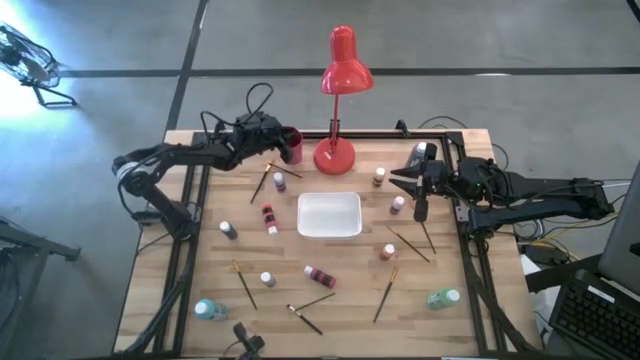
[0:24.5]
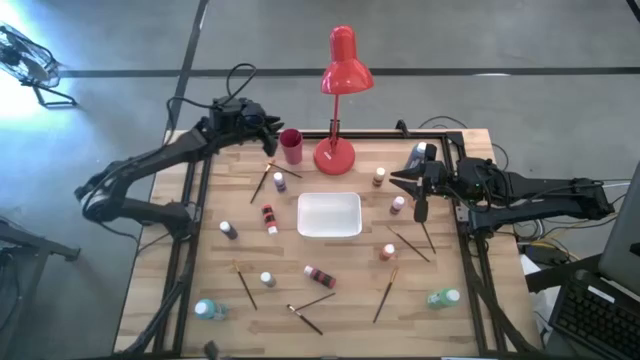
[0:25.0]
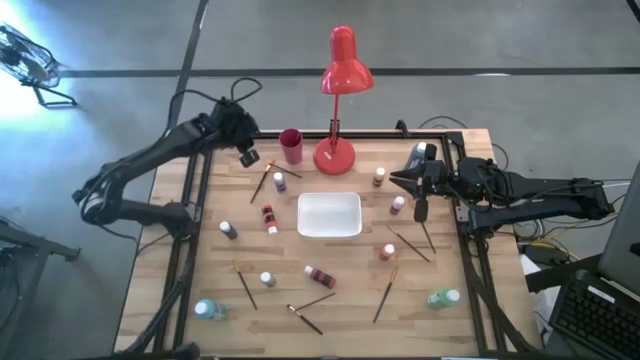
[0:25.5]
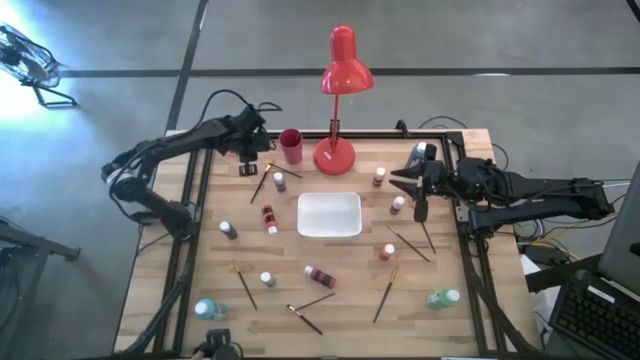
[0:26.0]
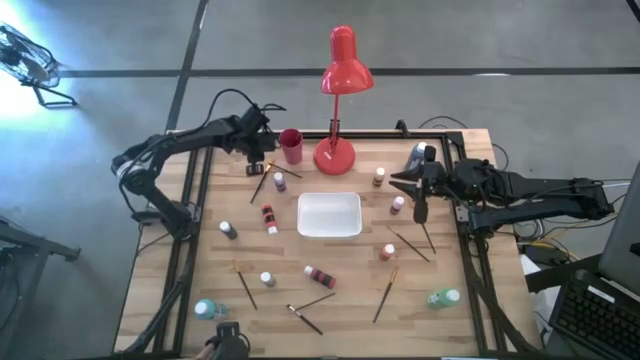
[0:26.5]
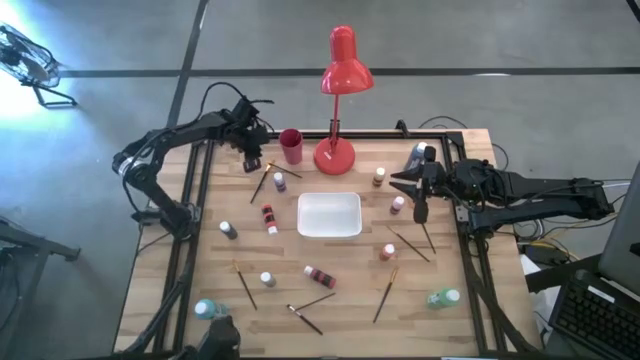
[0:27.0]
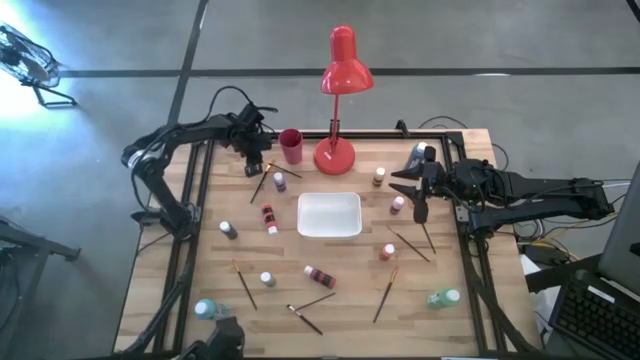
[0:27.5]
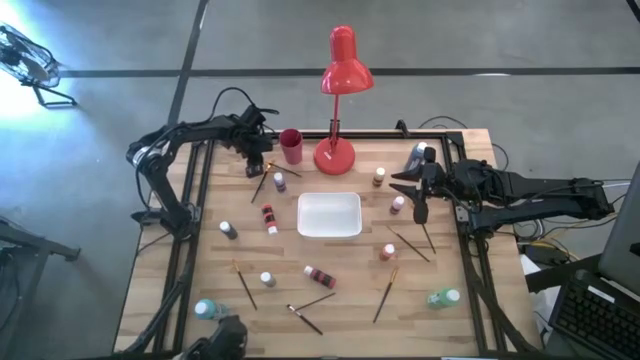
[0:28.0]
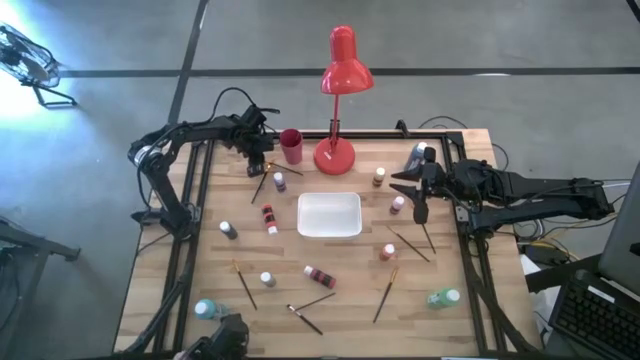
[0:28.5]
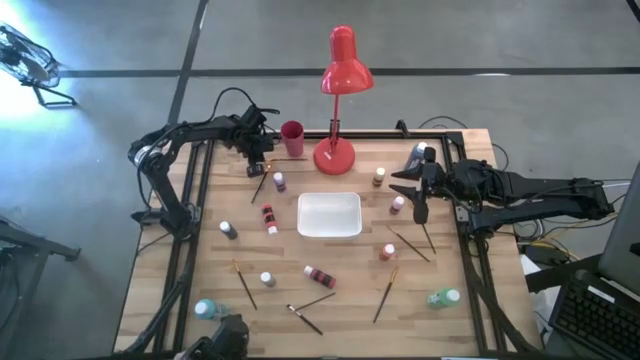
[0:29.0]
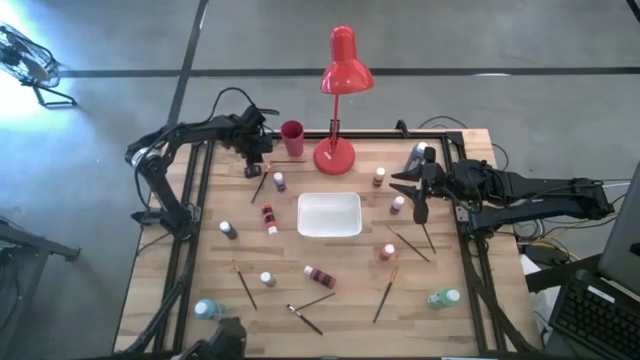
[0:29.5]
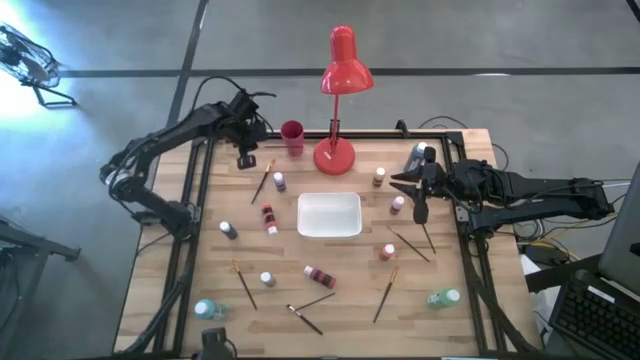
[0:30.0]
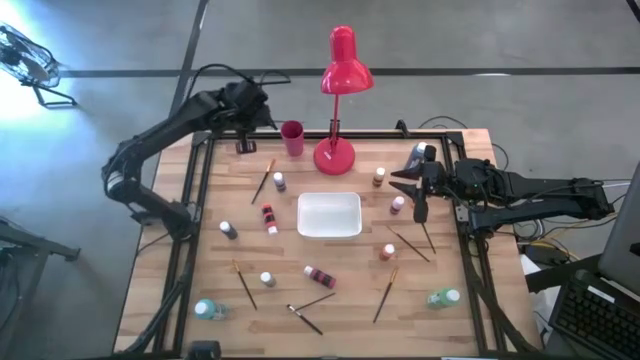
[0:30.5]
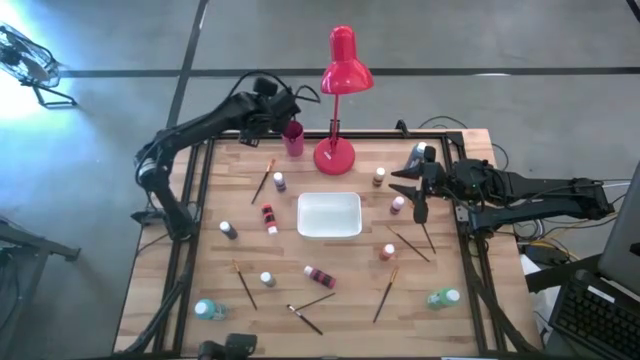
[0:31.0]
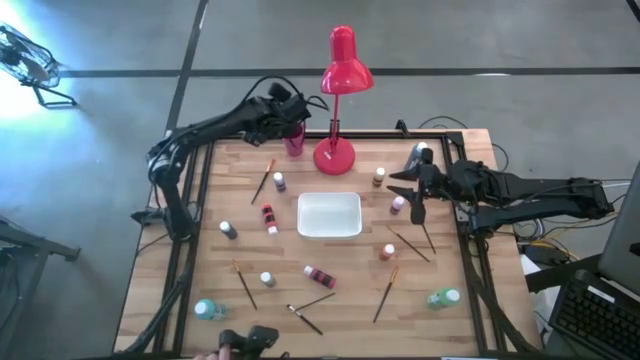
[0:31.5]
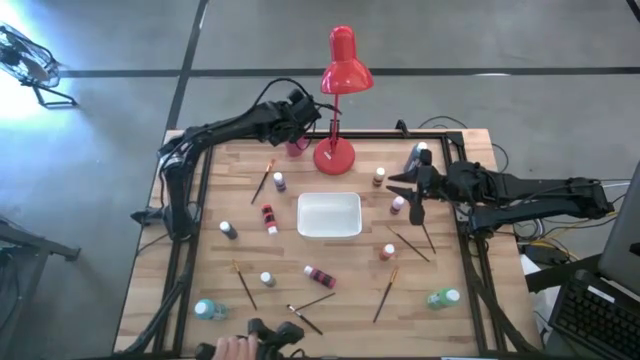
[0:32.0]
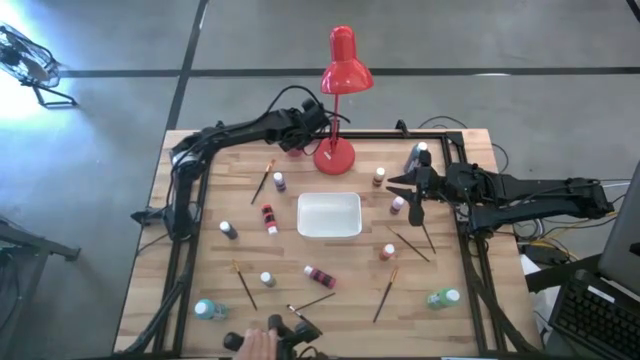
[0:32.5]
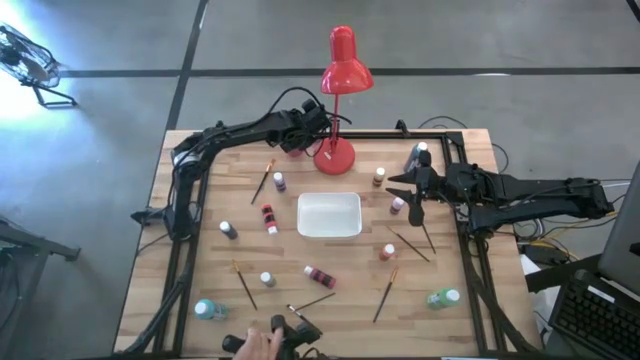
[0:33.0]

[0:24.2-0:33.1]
Task: Pick & Place Paint Supplies
Put the gold paint brush into the red cup

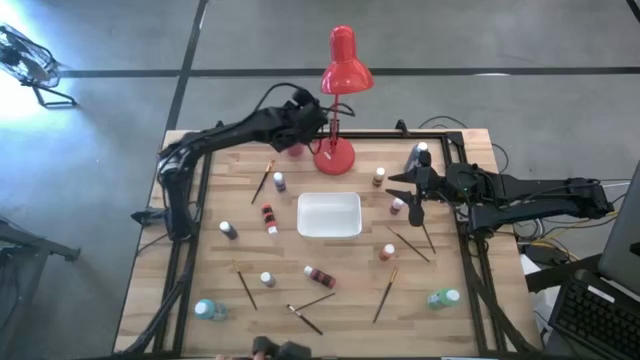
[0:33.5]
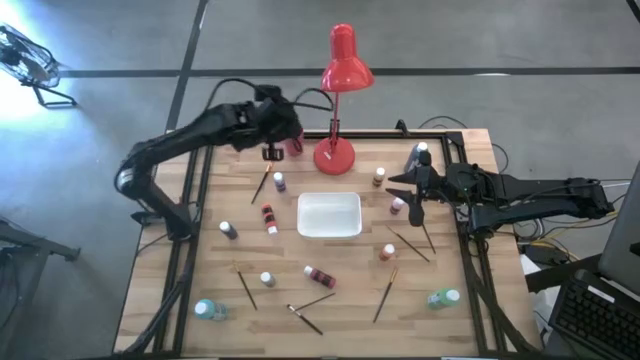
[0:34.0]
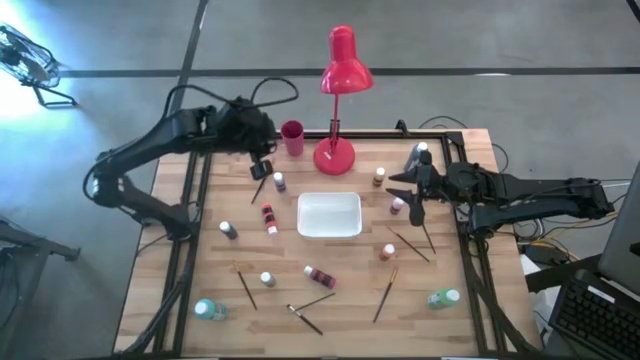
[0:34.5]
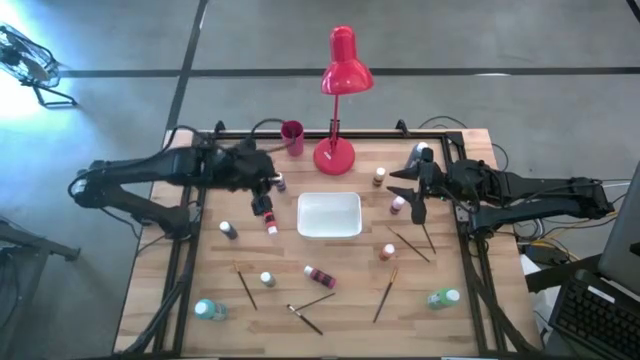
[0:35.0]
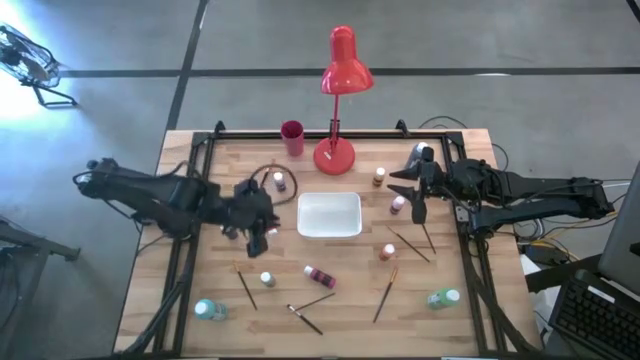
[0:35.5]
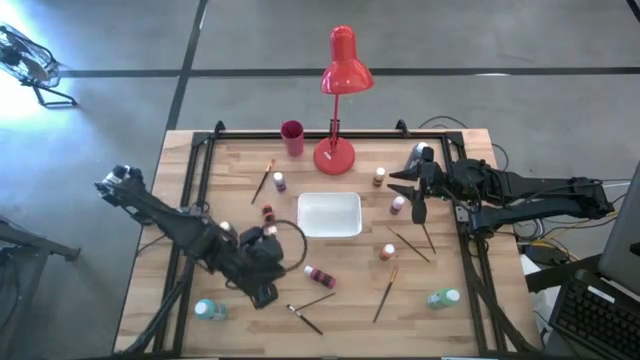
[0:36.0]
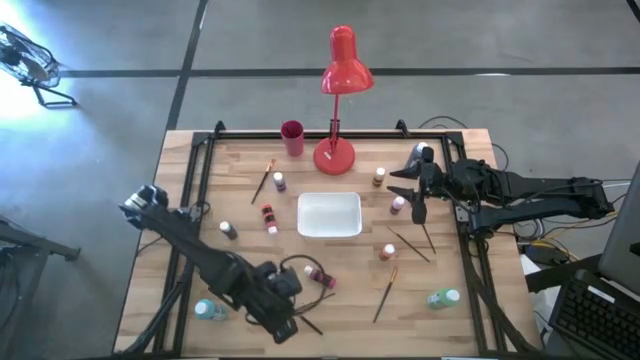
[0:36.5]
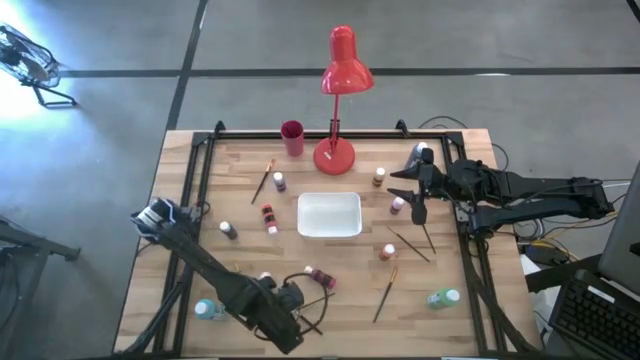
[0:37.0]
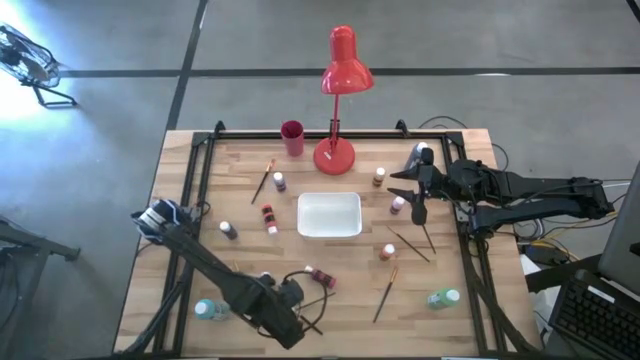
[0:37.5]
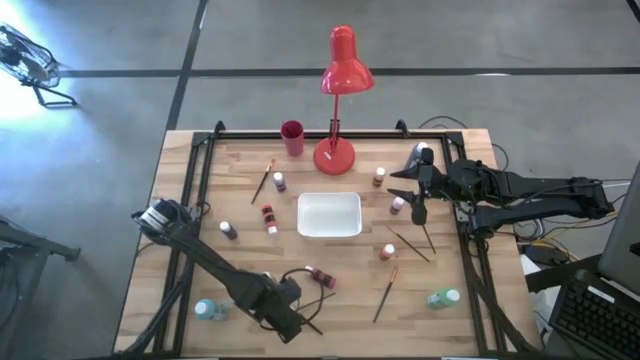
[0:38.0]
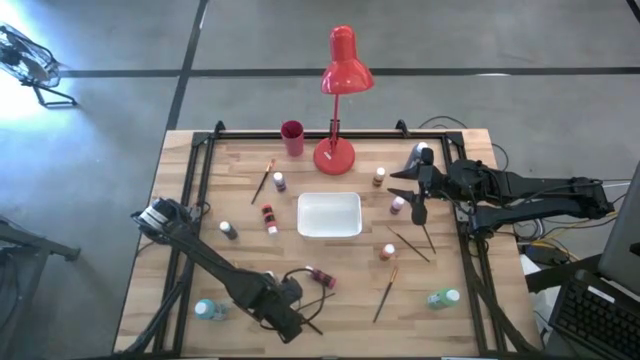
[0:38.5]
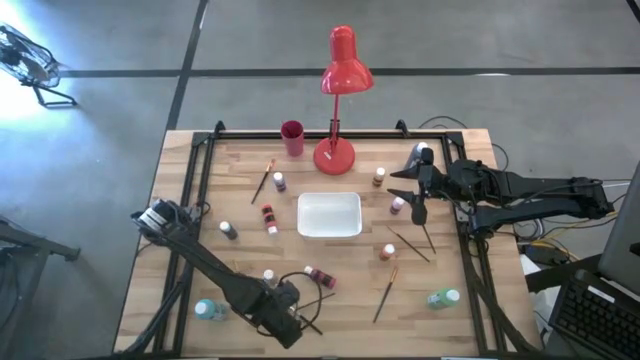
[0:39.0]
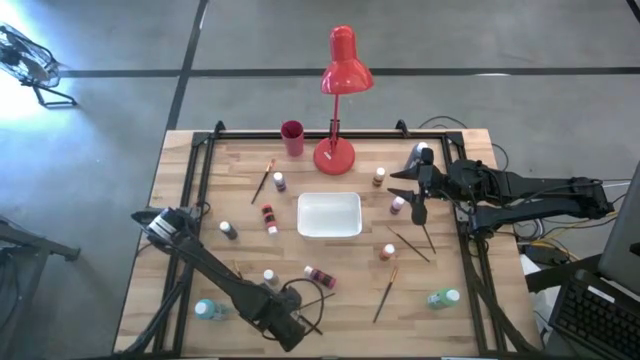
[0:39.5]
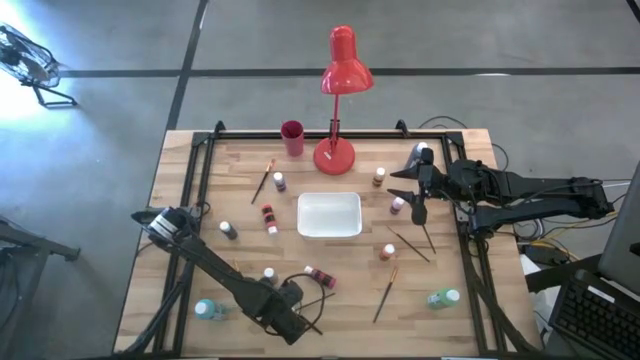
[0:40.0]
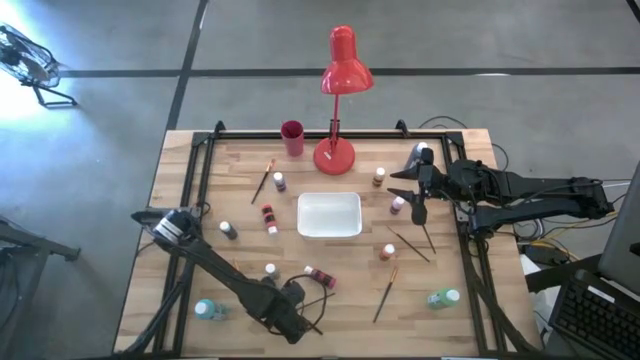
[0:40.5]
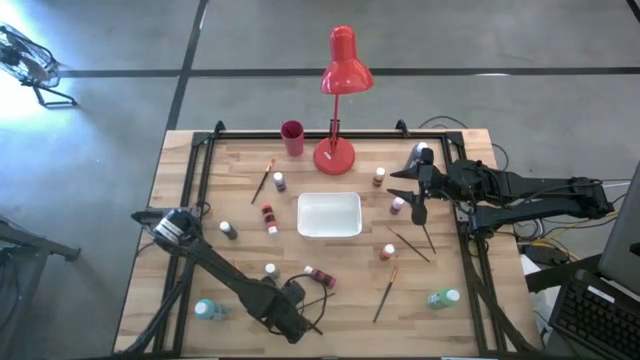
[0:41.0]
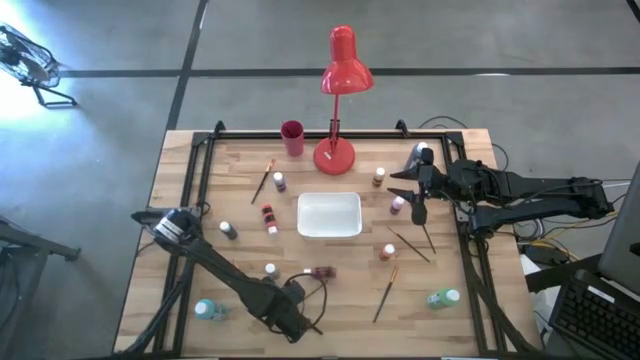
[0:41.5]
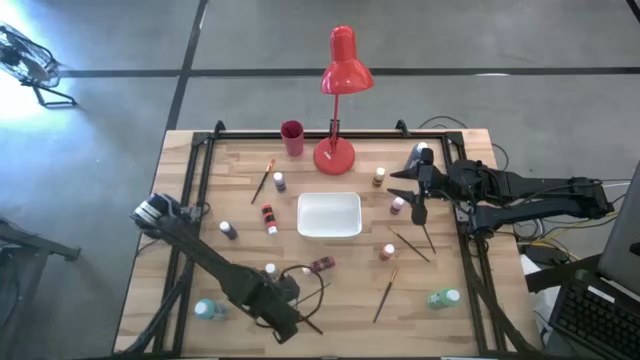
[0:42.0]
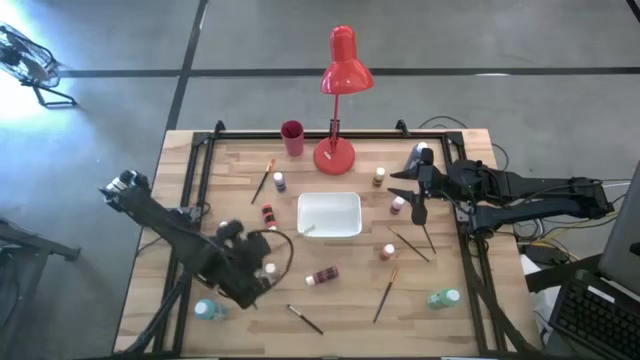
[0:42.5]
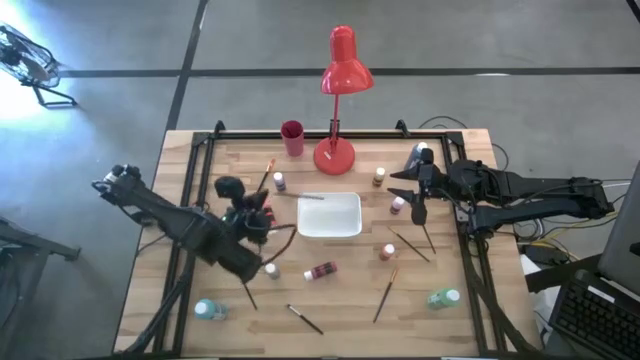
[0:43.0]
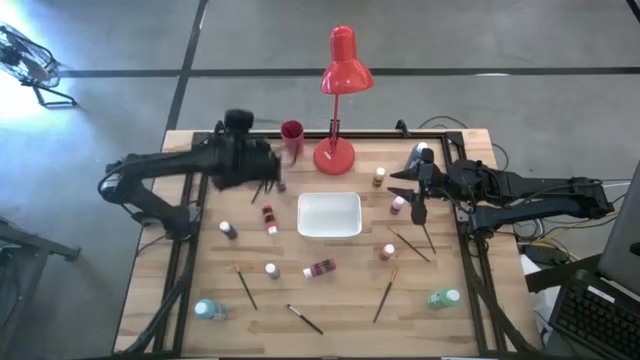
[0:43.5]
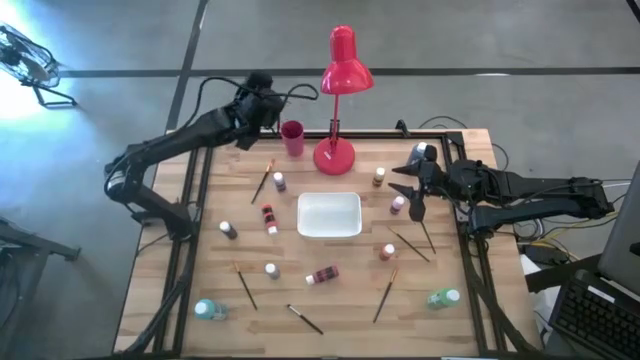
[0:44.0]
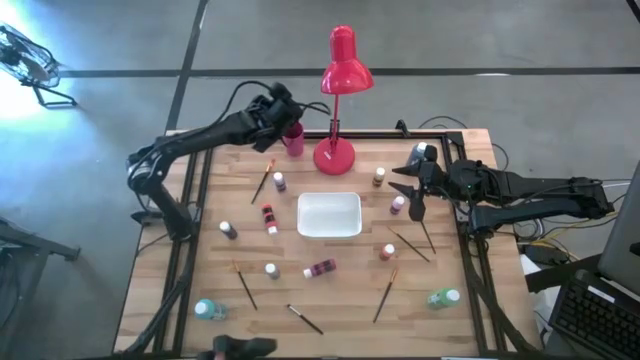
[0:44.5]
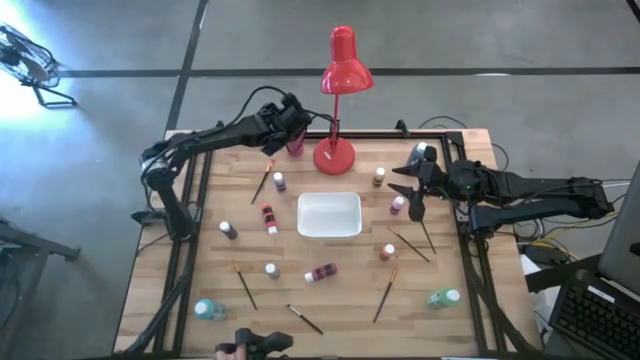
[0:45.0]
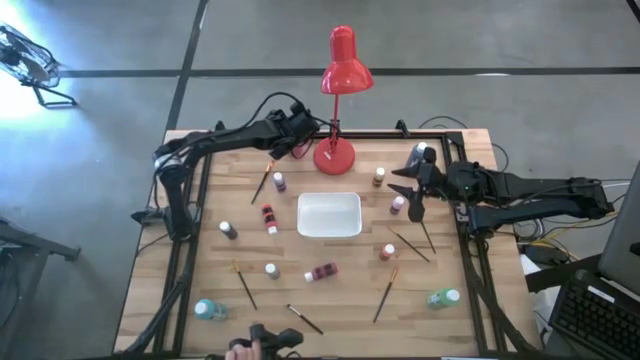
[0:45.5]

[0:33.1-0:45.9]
Put the gold paint brush into the red cup
